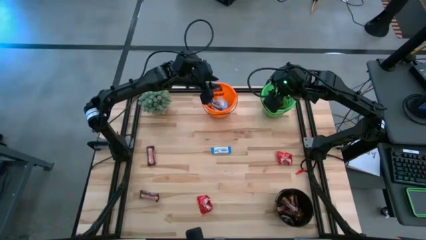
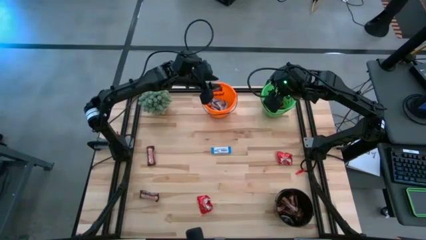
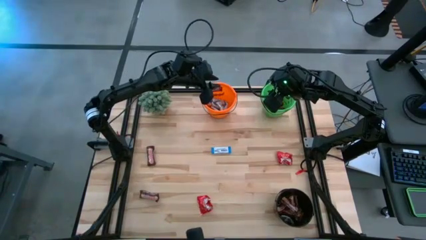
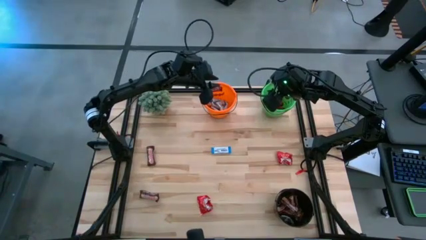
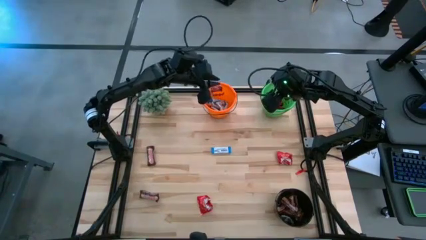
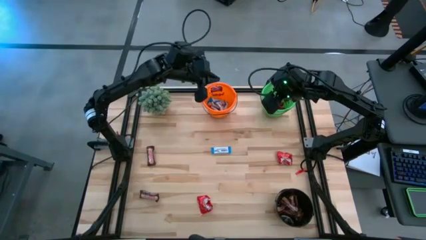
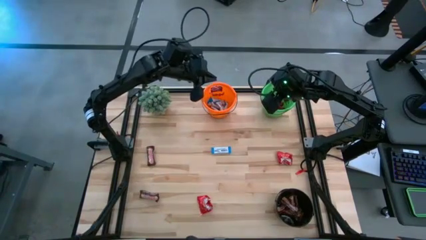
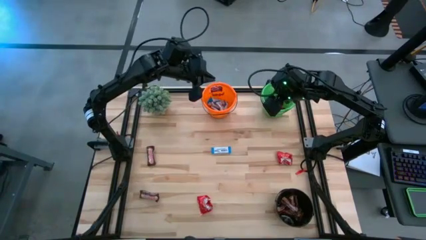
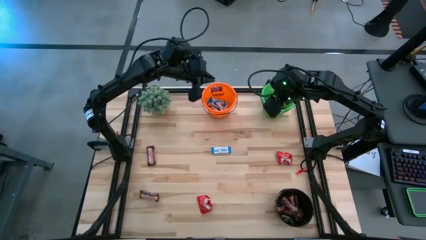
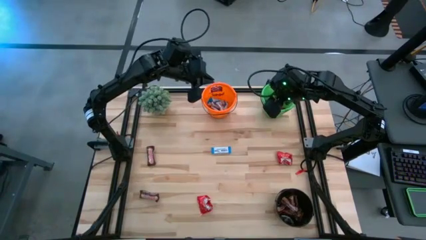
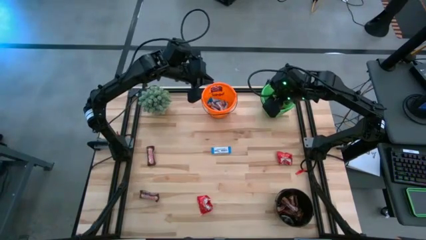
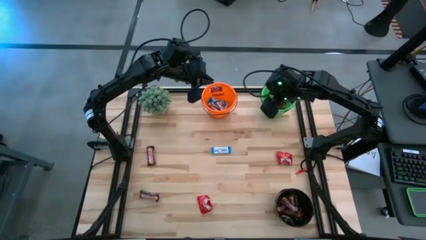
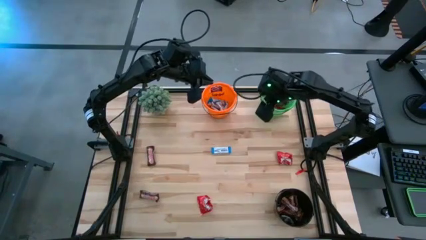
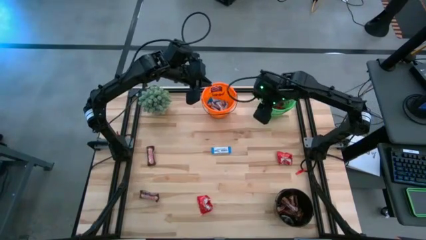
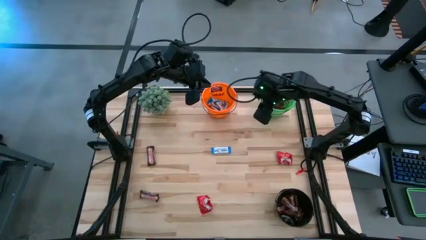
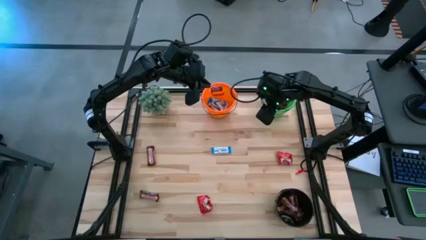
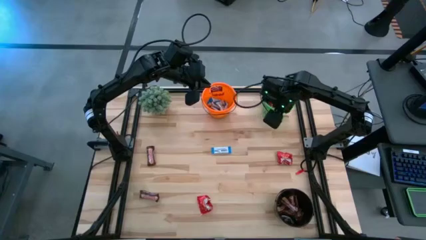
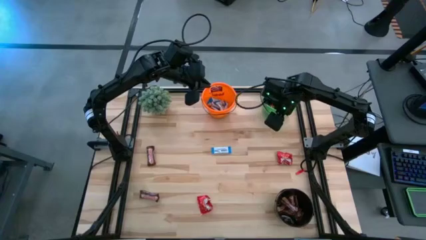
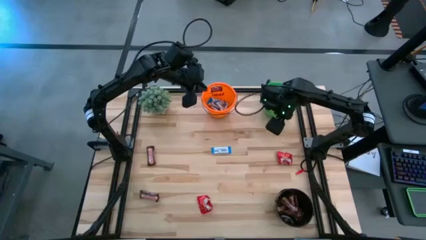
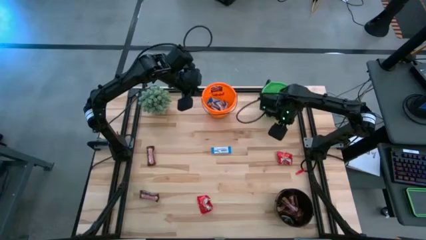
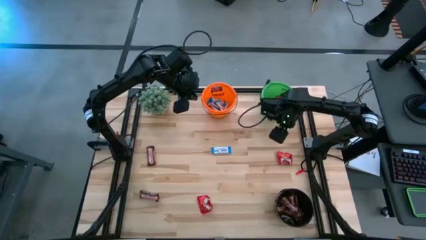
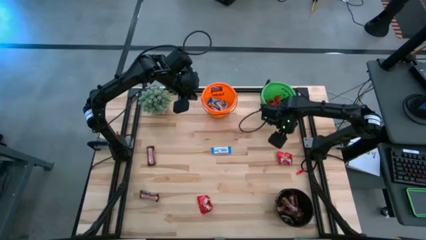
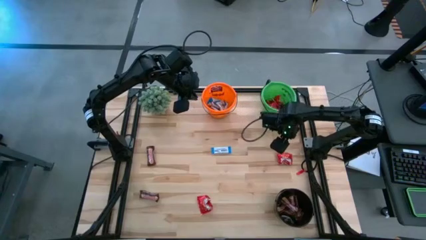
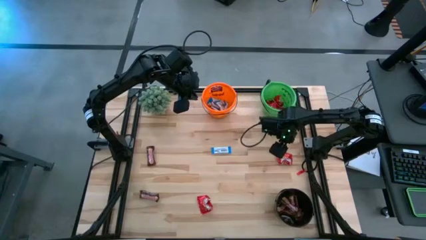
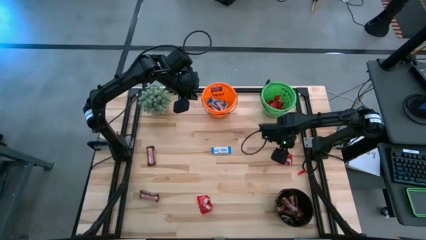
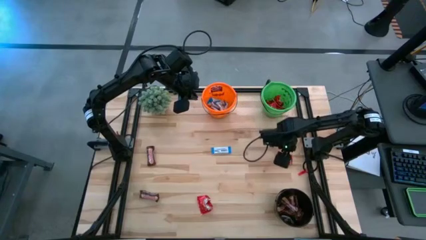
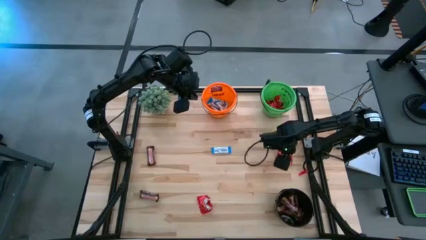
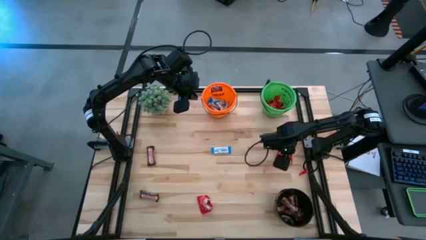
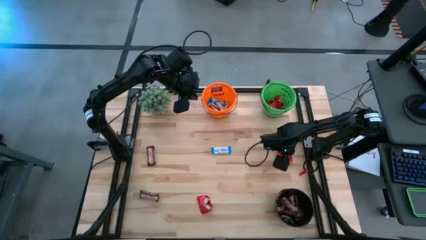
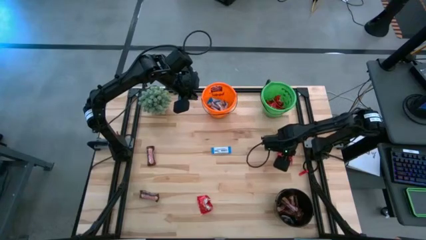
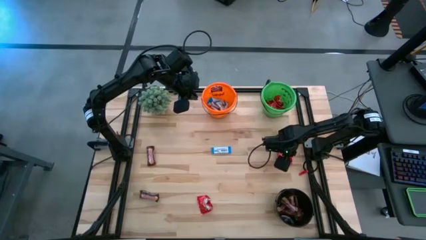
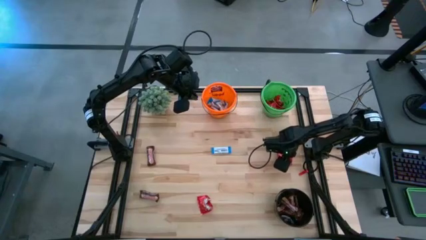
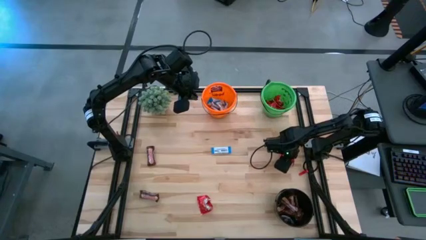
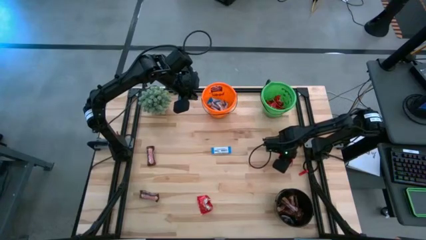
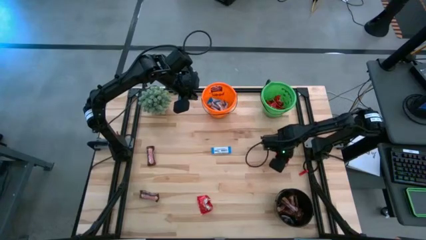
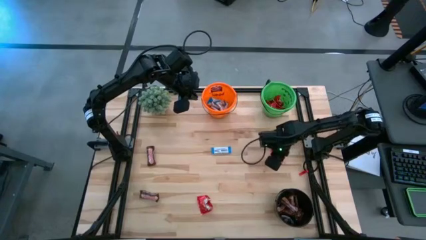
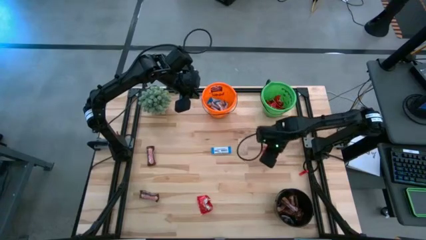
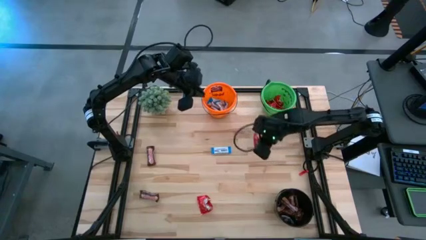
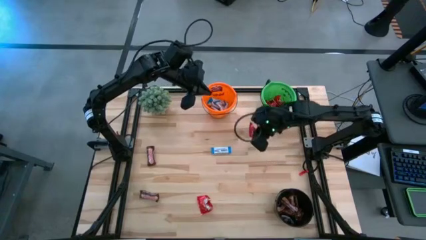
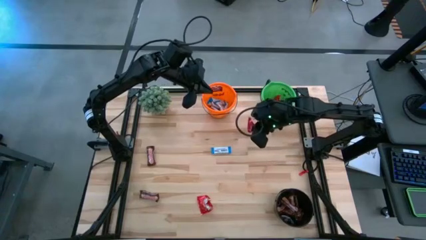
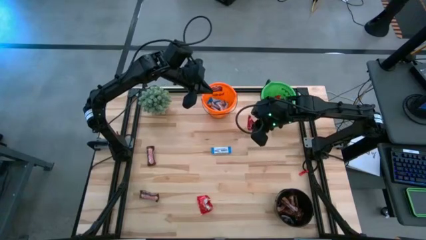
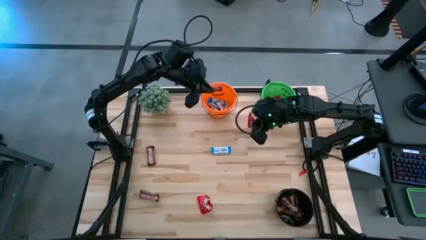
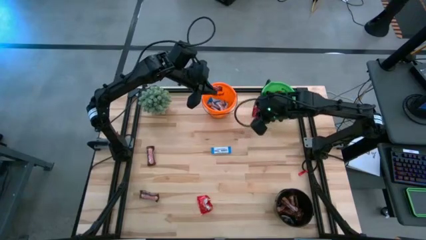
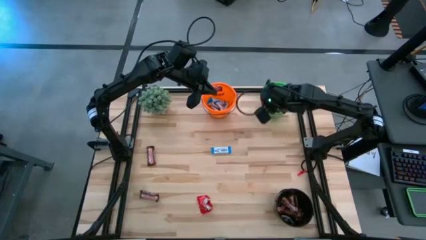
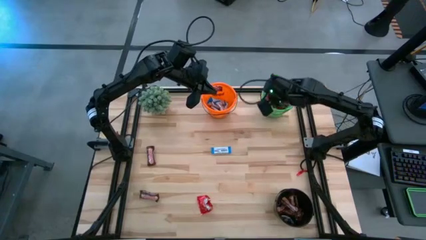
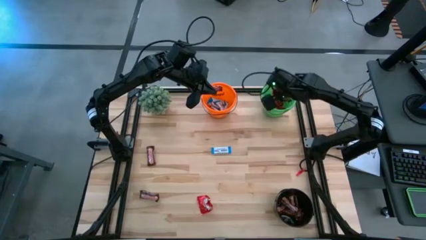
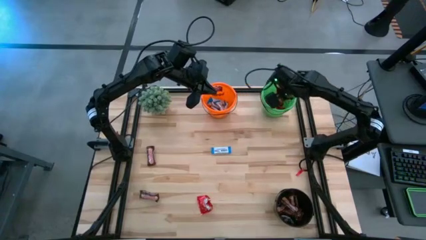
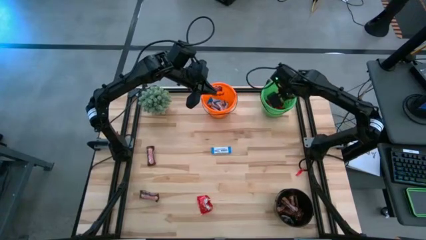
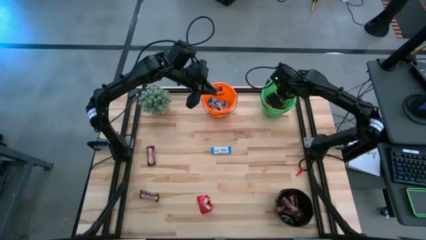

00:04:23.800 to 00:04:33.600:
Task: Organize candy in baskets
Put the red candy into the green bucket

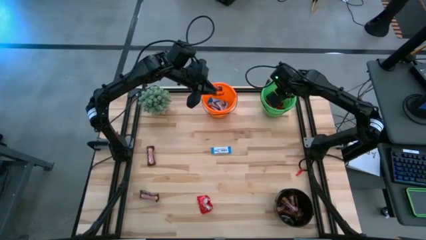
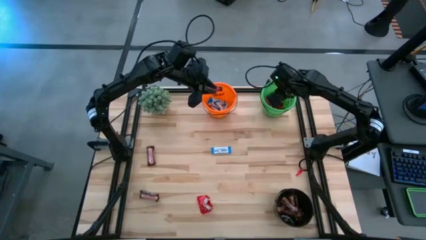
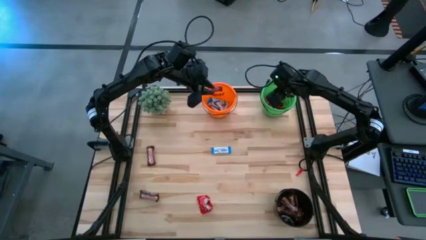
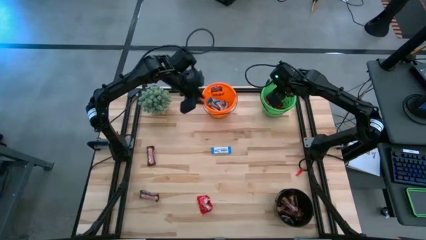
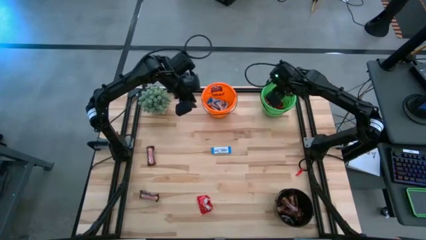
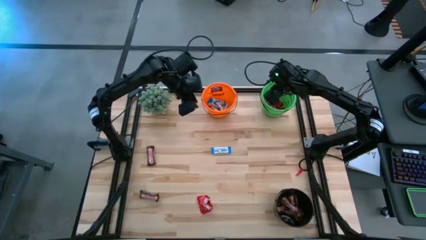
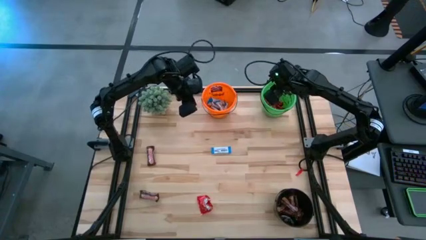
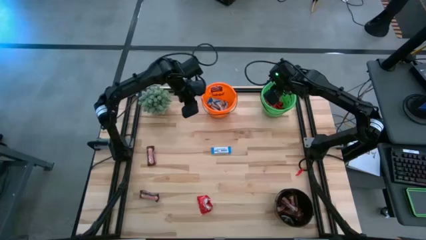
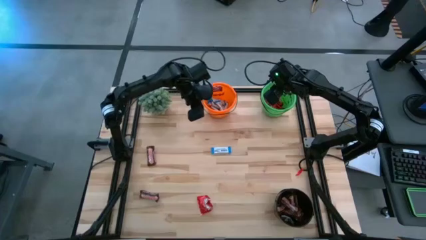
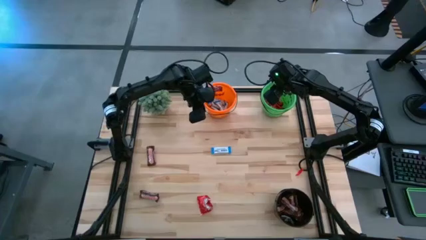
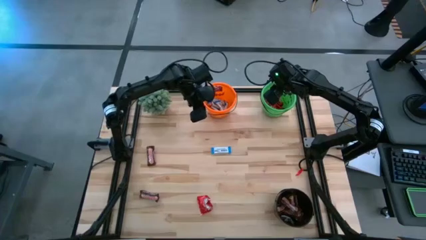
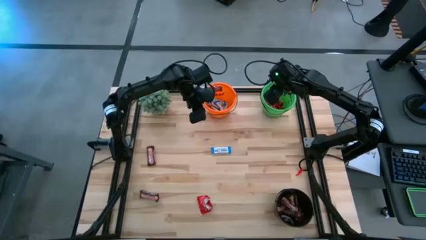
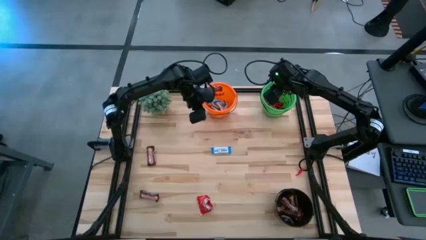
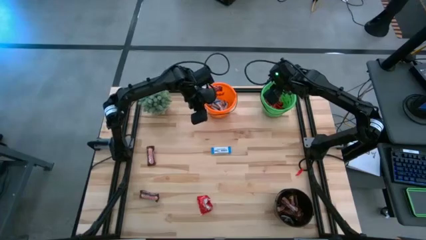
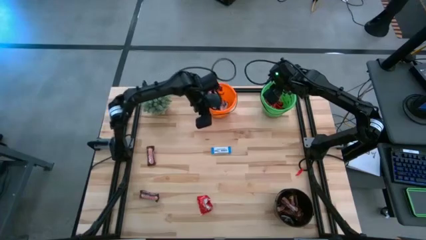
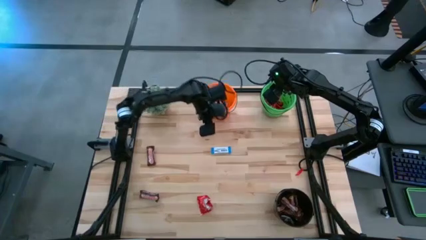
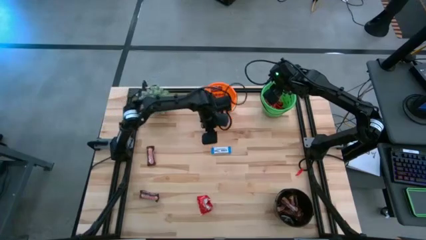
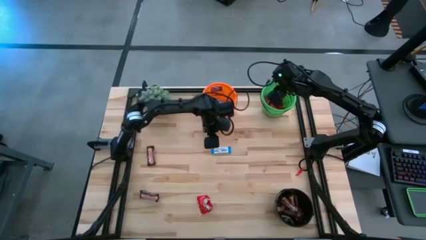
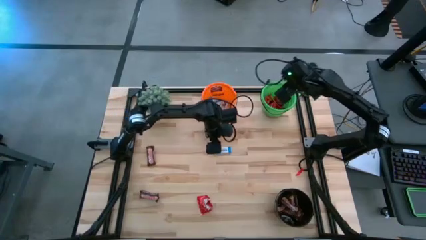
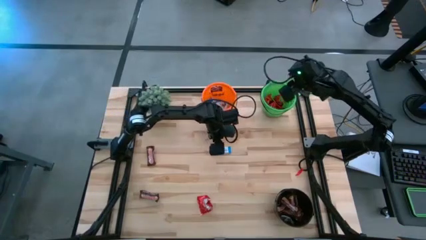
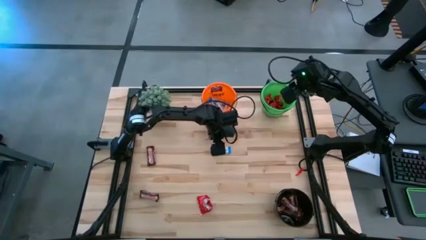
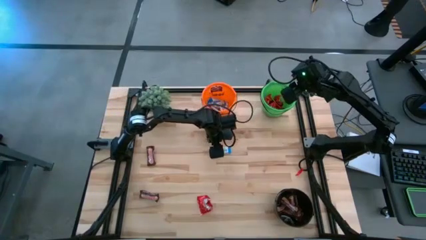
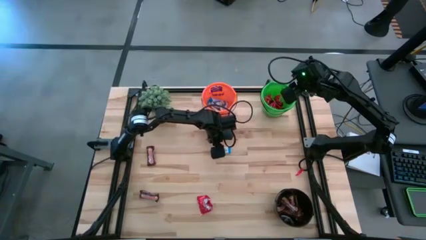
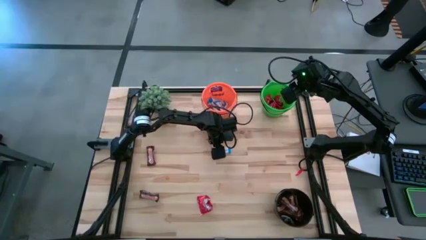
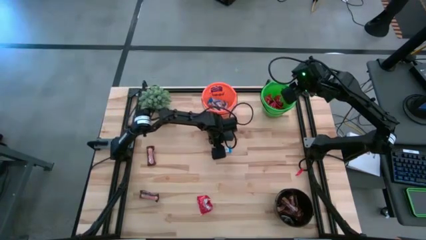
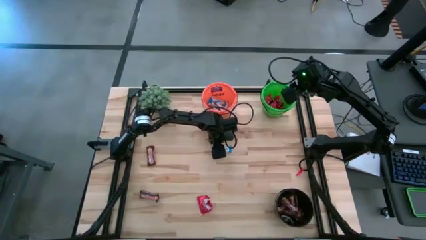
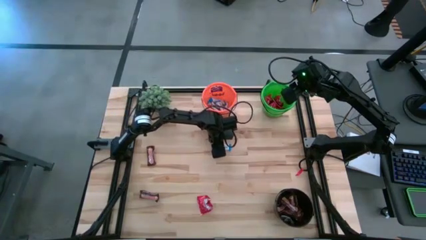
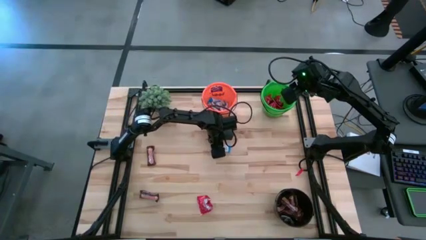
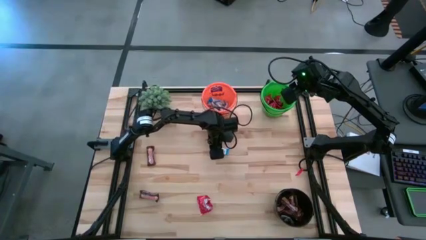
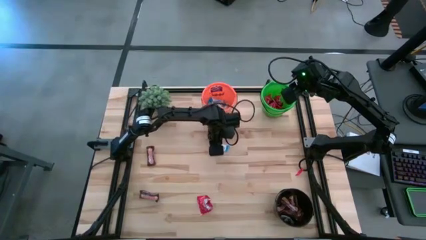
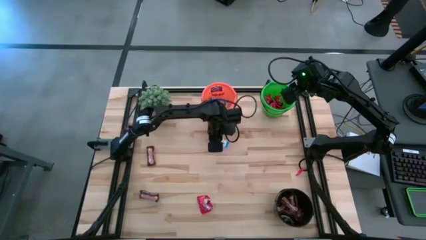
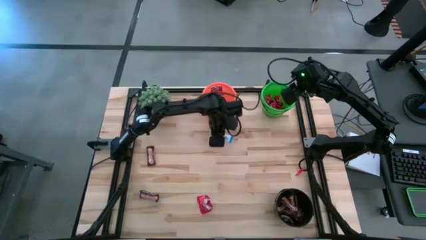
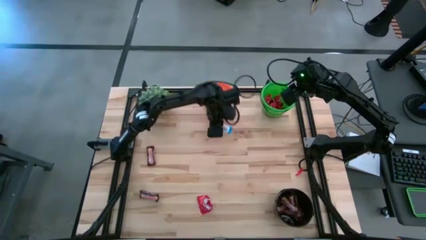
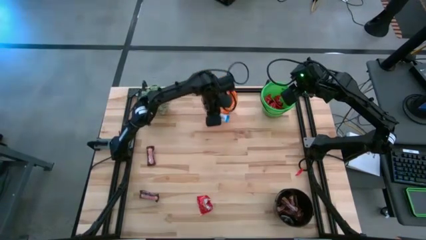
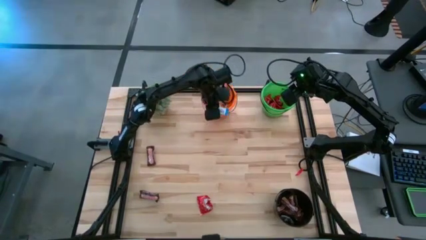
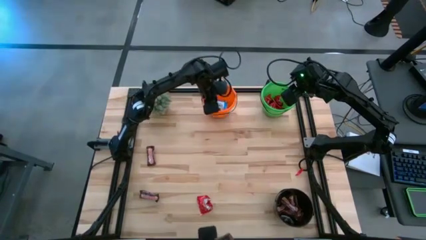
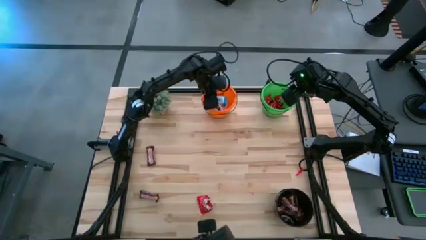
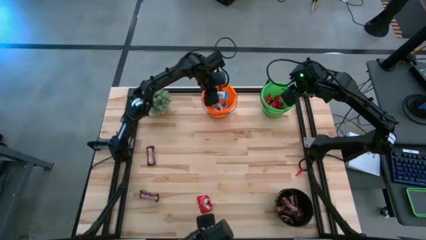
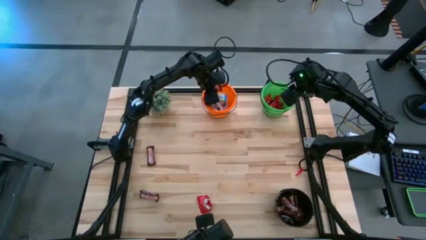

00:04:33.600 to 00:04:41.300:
Put the white chocolate bar into the orange bucket
